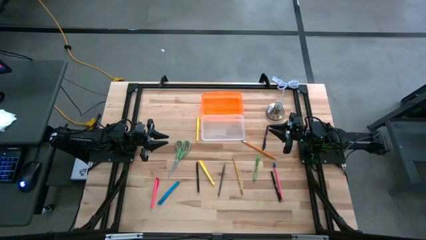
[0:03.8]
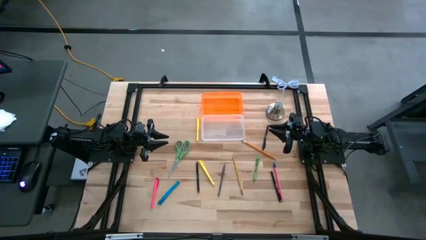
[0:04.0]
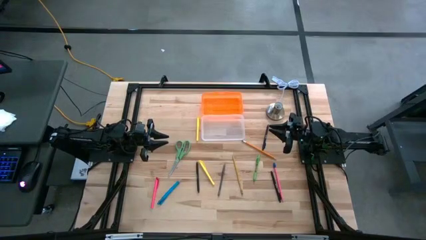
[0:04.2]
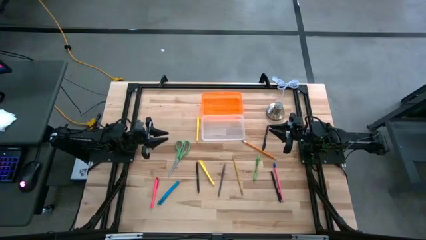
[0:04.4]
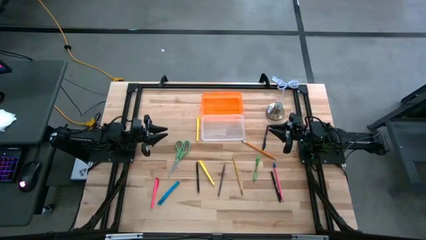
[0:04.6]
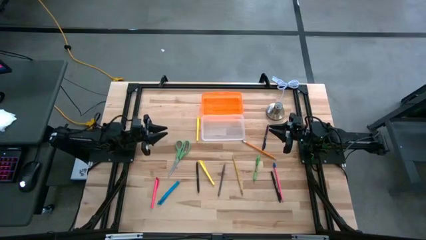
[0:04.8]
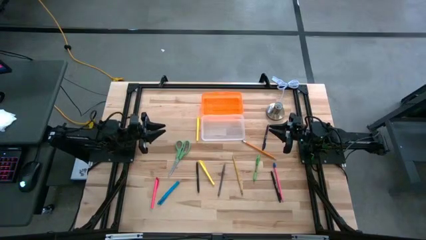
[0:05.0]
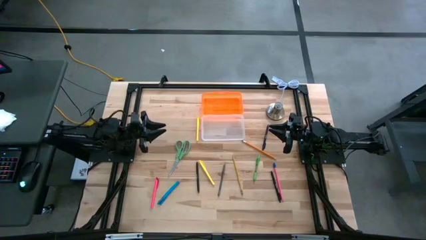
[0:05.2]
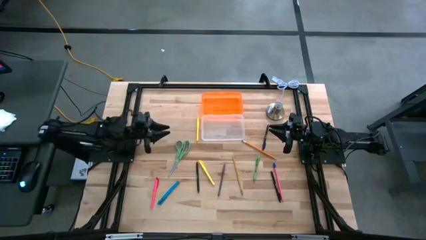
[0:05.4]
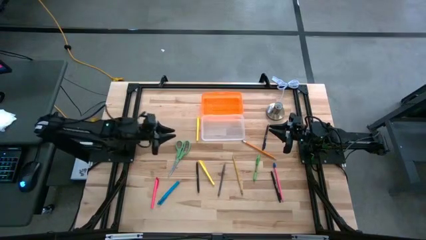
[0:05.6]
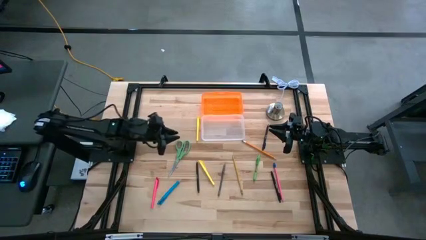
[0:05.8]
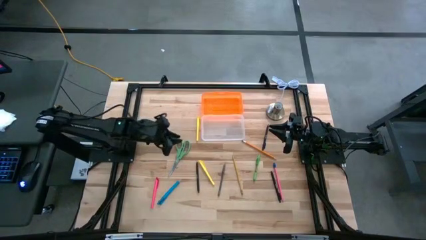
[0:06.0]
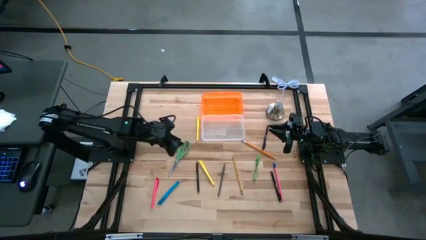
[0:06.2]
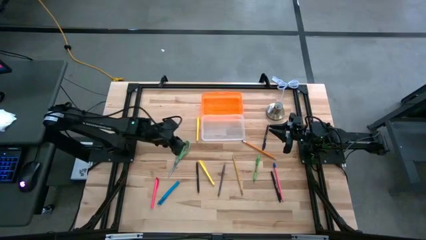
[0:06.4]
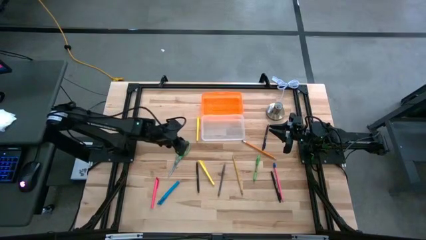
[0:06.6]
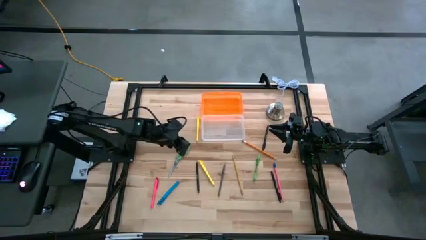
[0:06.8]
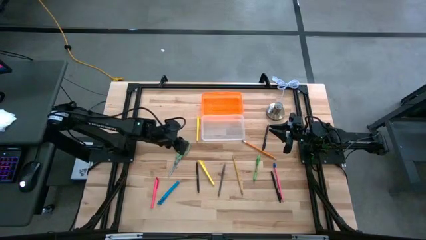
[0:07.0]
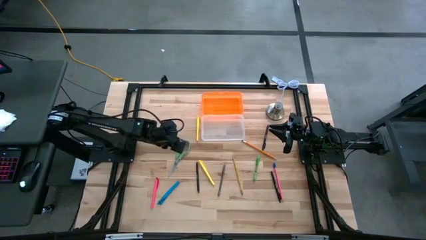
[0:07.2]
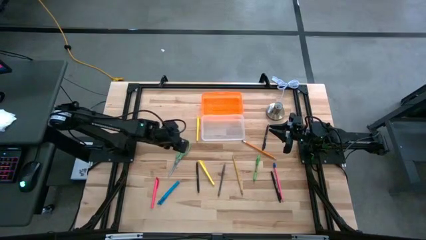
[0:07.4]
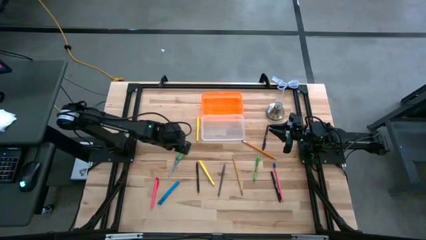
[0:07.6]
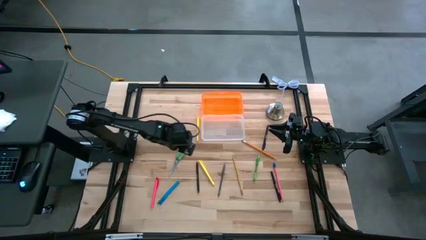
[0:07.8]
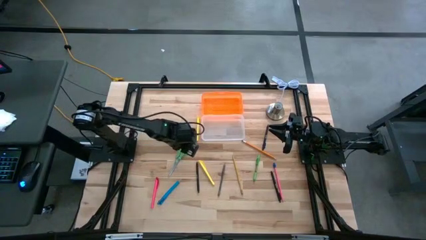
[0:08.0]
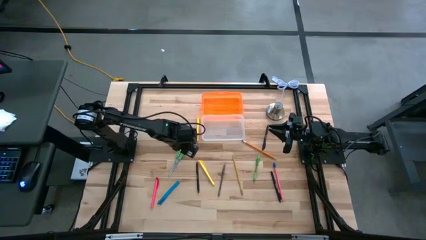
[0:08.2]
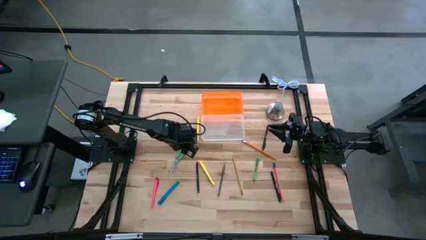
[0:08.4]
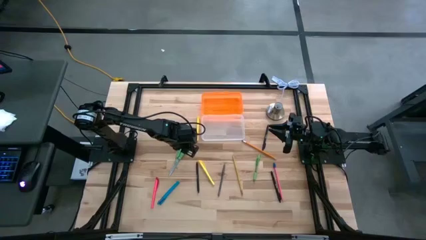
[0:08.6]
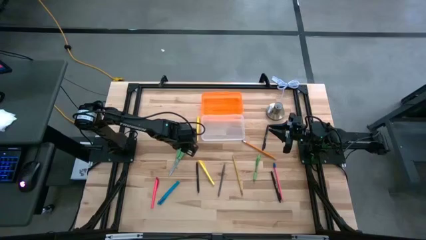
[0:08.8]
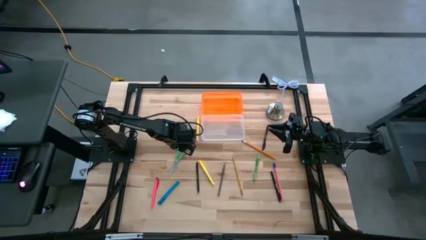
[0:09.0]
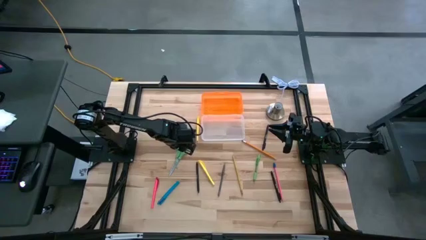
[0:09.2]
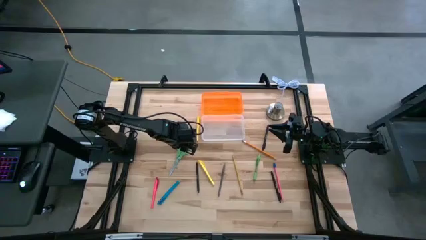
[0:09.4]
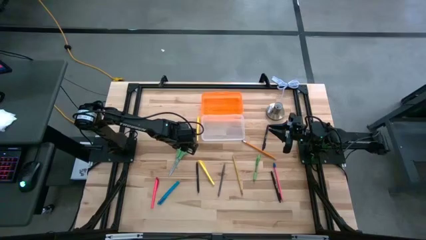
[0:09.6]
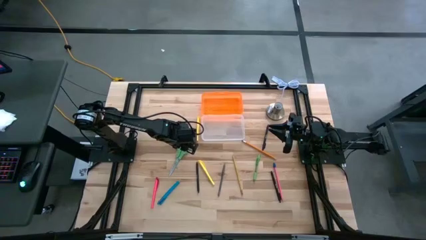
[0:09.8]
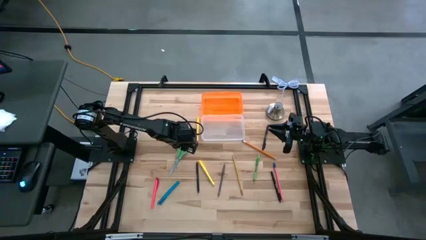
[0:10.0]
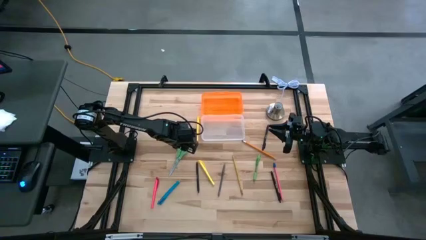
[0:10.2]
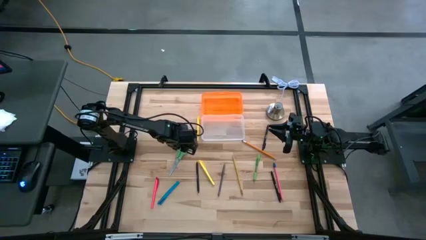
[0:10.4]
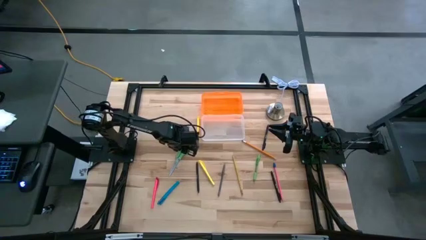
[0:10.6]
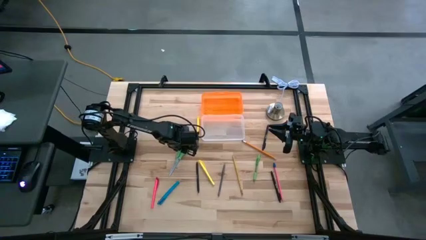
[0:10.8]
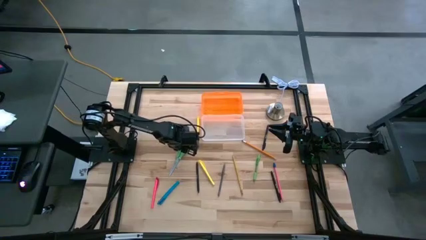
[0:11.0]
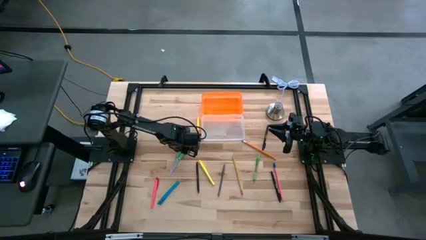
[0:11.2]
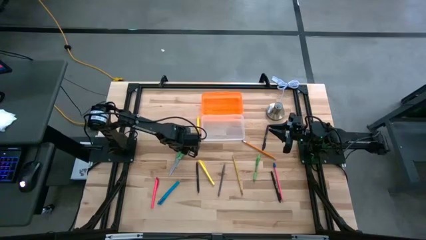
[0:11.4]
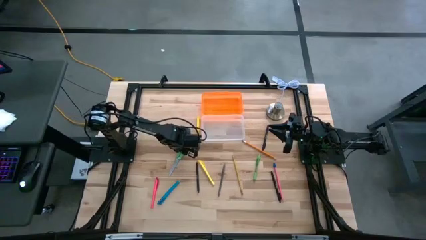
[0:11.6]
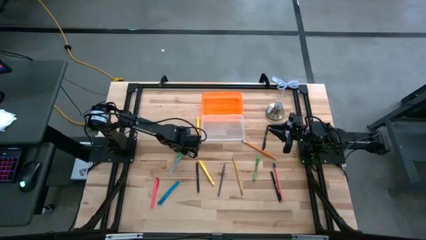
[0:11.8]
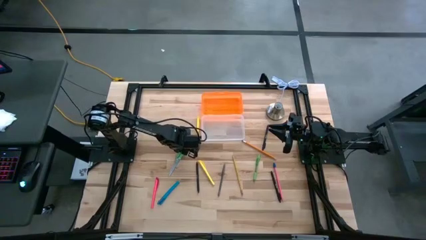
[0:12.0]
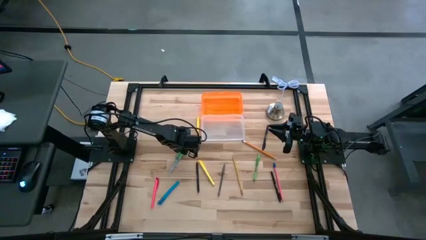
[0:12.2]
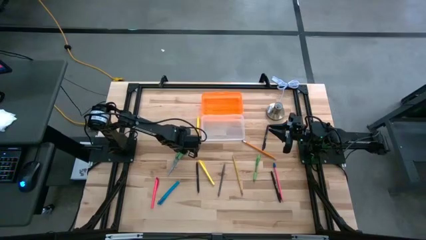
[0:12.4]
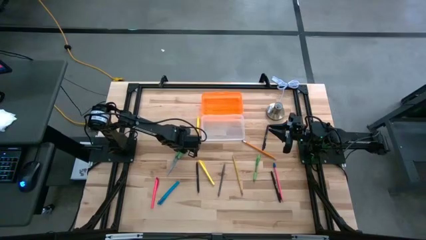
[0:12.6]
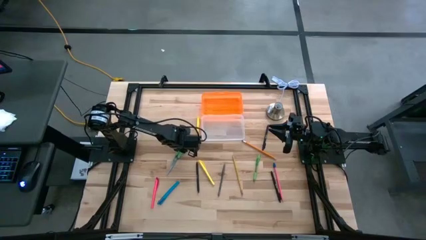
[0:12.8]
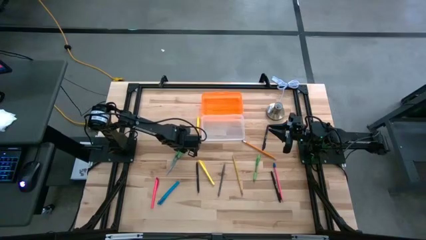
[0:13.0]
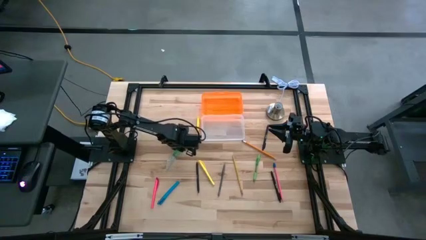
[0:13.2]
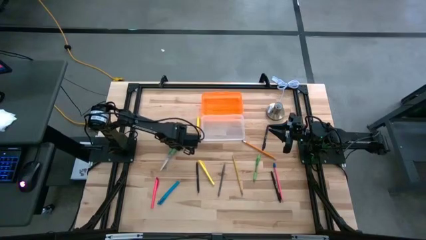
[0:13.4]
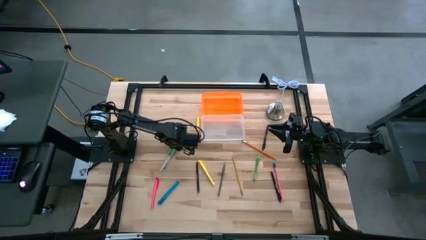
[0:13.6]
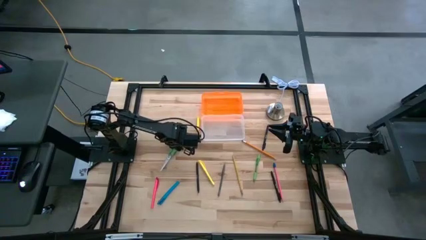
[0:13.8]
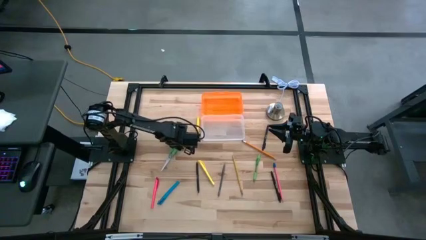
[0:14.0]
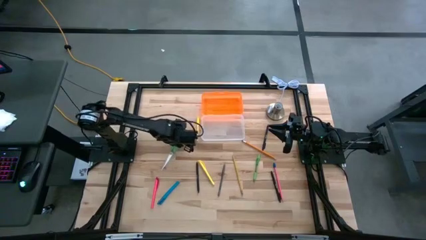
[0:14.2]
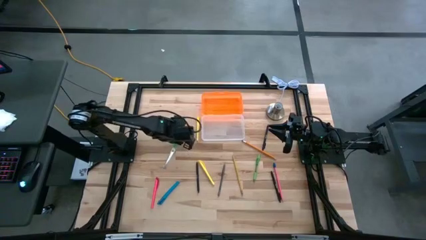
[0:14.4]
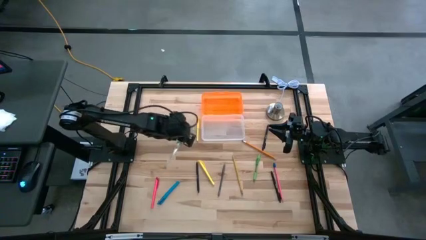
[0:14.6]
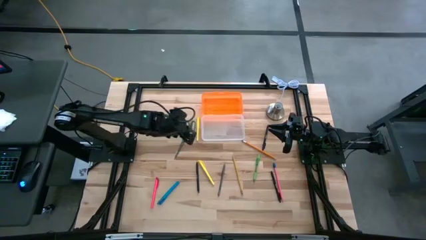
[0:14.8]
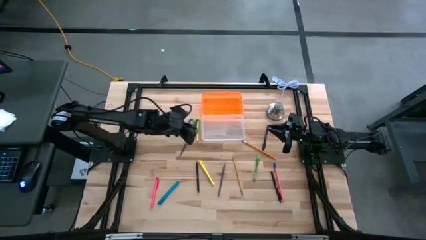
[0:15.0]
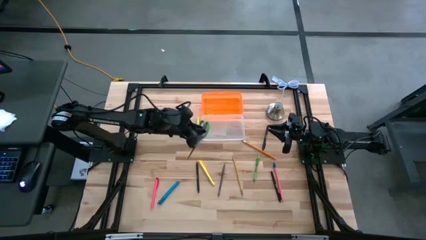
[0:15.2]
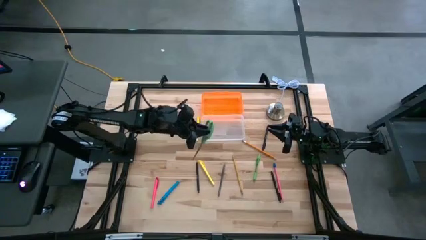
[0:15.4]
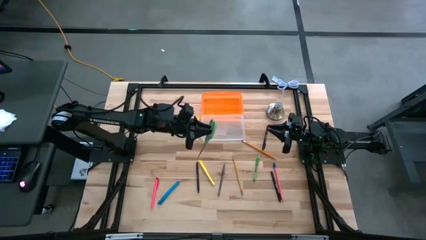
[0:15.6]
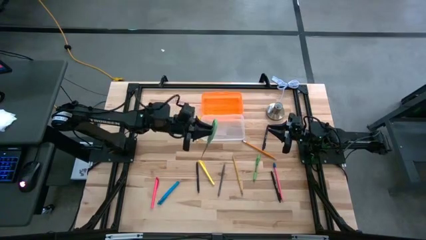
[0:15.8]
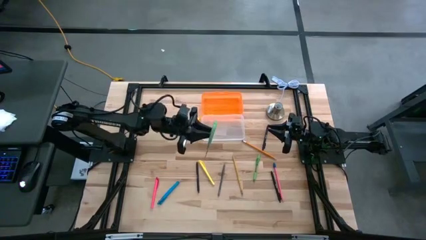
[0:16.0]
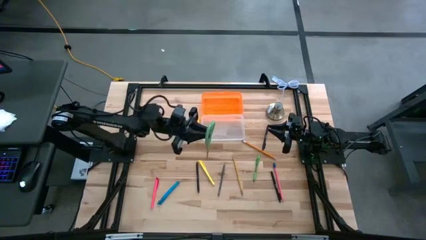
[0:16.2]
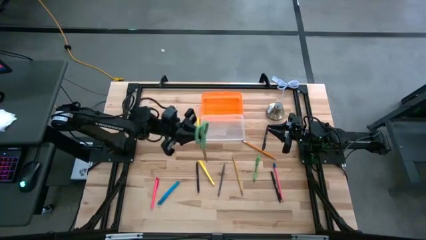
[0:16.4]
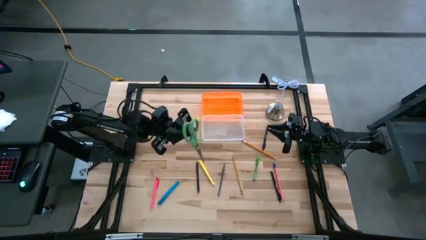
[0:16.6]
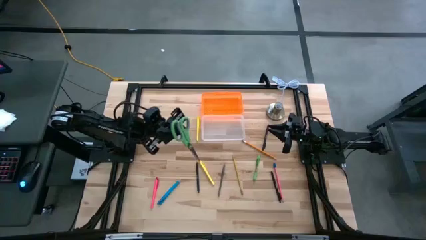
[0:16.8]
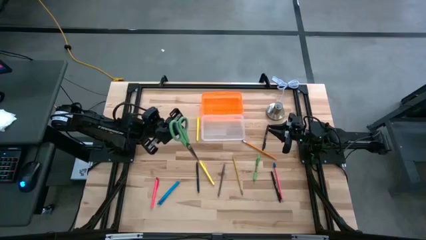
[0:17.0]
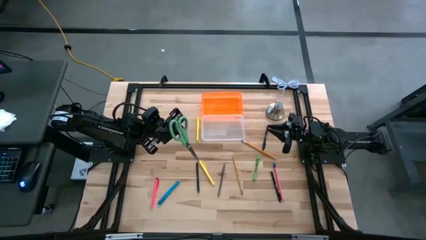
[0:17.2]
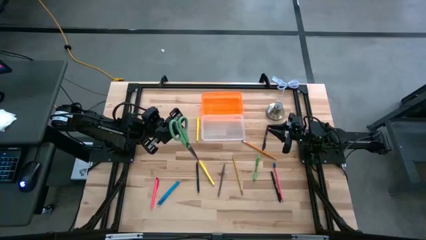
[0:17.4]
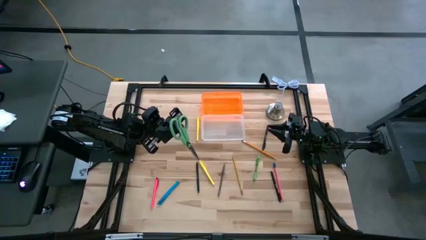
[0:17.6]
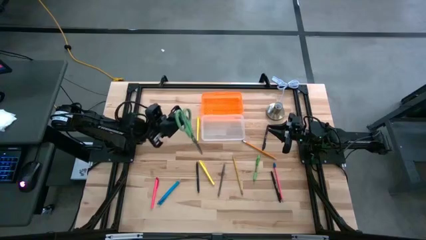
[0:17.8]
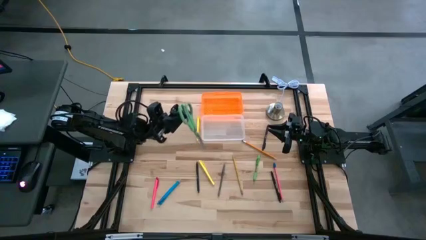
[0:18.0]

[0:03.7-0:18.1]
Task: Pick & place school supplies into a supply box
Put the green scissors into the orange supply box
